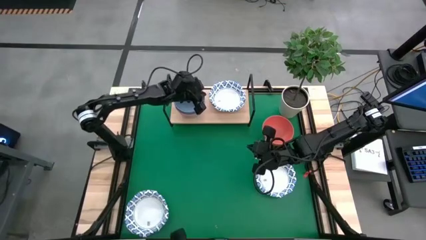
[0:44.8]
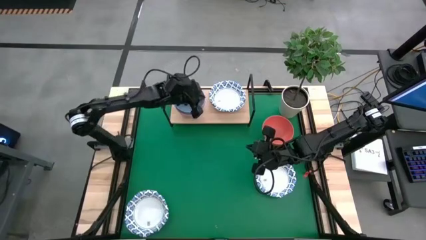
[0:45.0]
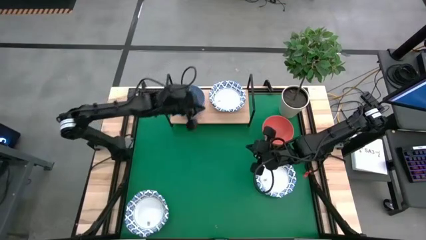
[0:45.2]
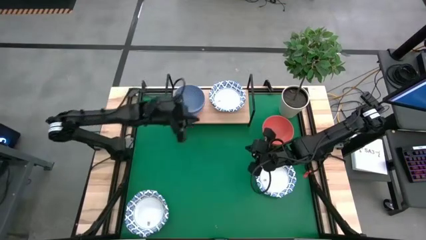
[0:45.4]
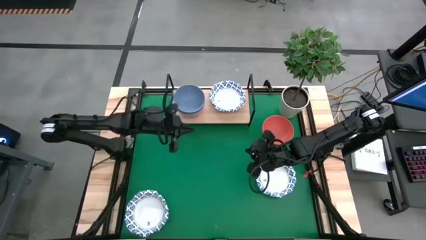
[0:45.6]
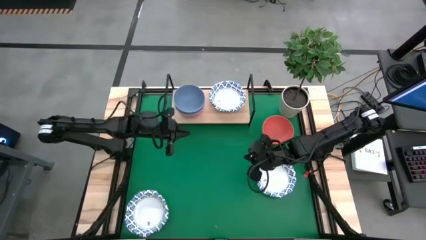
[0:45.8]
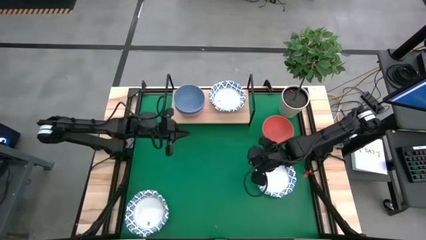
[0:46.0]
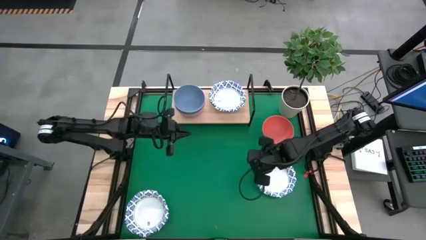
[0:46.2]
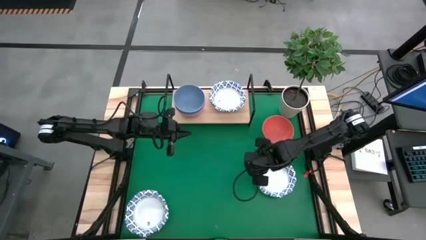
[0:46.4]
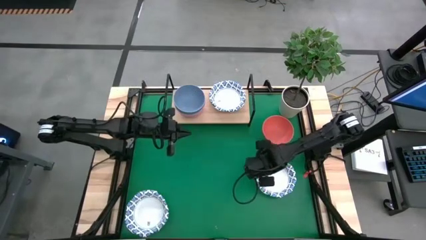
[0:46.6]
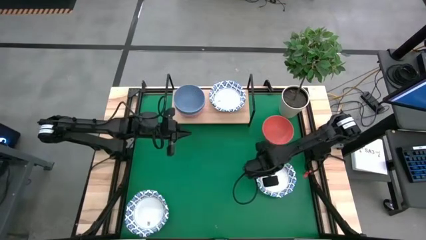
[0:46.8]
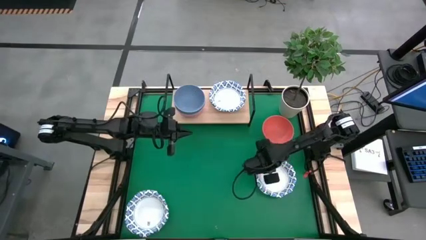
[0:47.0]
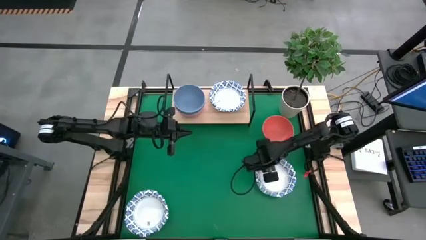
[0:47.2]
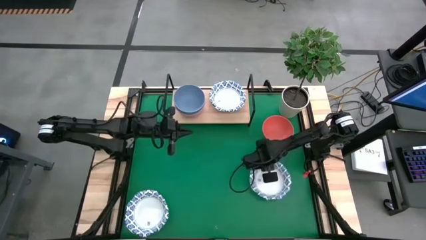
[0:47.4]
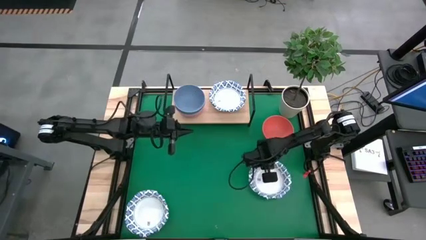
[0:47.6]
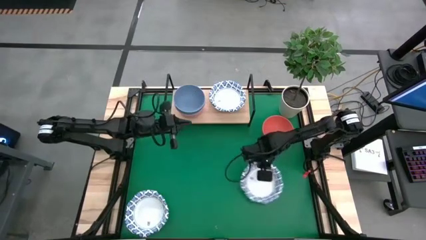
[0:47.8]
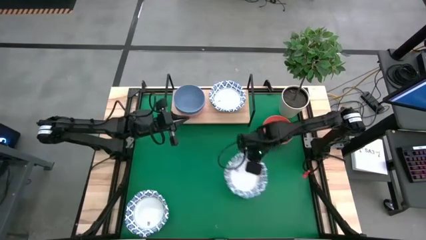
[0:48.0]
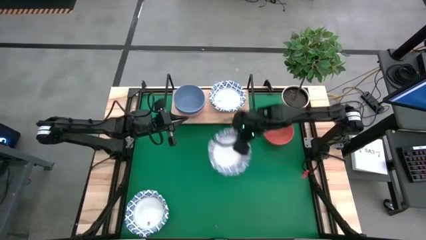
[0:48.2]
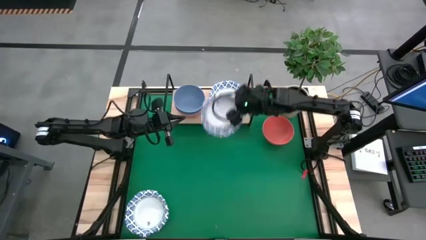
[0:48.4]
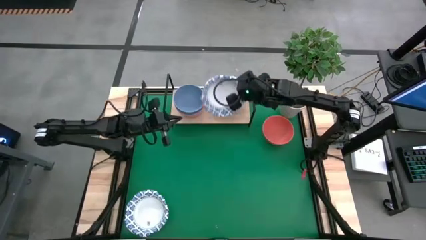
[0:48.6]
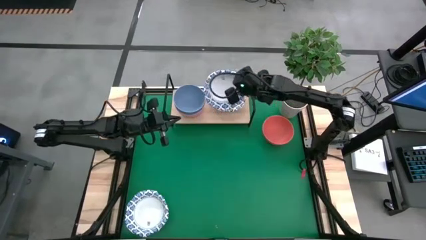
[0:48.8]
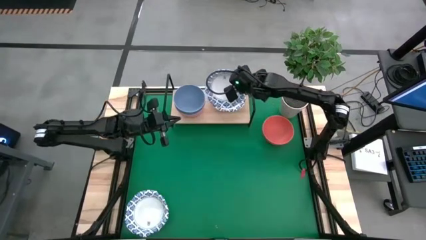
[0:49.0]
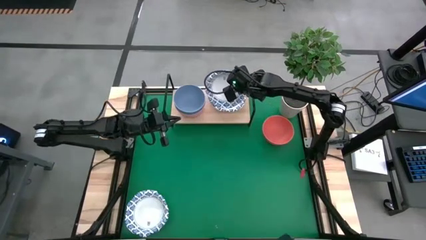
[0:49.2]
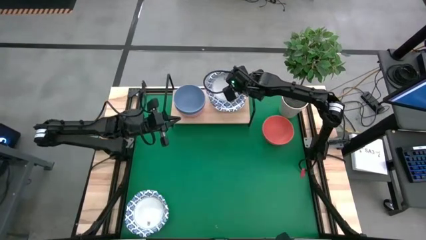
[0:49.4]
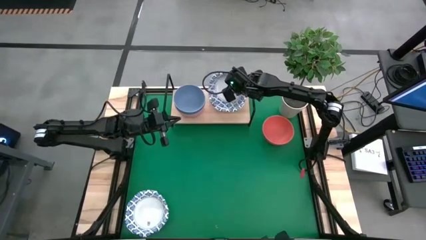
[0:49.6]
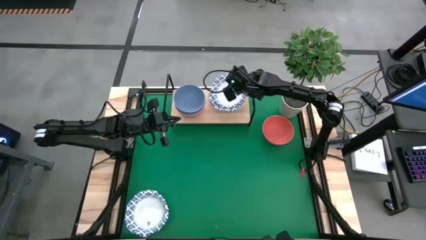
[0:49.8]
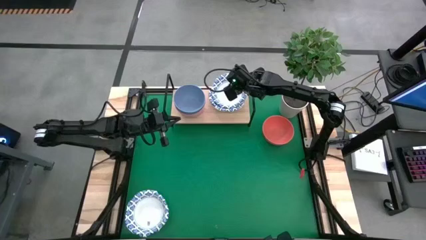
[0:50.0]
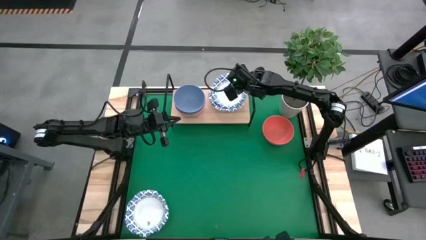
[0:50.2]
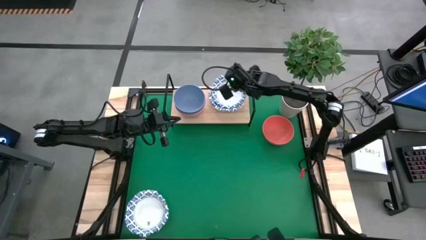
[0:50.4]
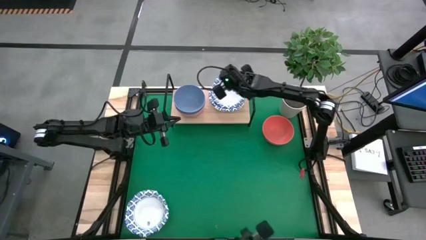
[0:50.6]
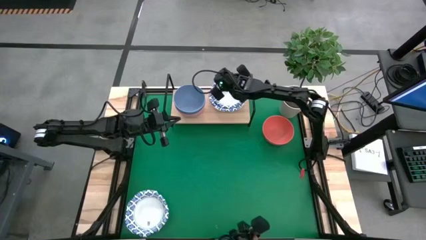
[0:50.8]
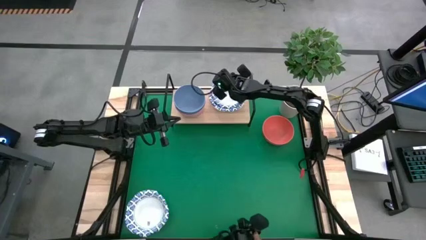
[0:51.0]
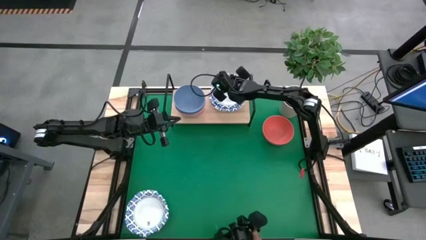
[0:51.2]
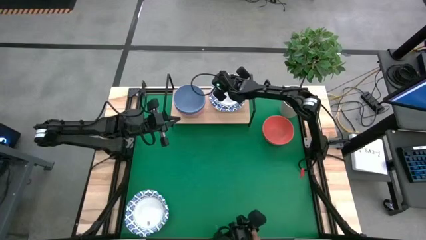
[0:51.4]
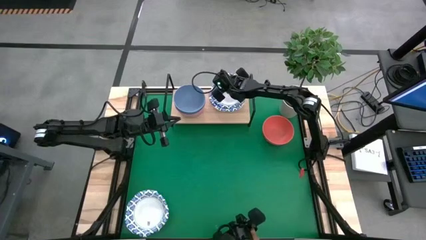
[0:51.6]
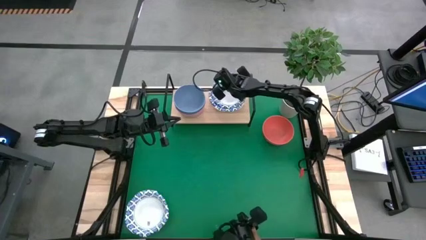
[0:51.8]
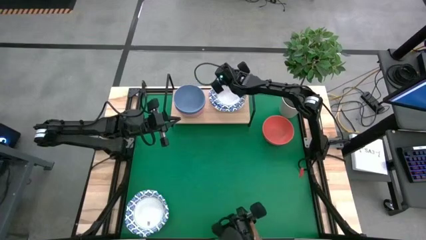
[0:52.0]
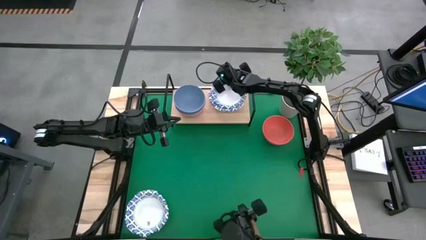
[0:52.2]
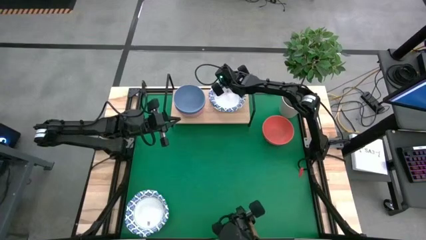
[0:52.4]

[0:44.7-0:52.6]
Task: Place and stack bowls onto a shelf
Stack the blue patterned bowl on top of the blue patterned bowls on the shelf

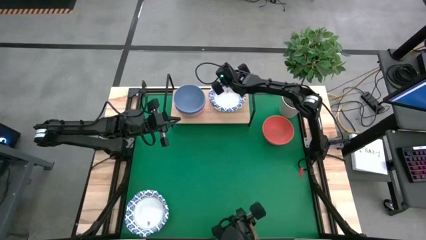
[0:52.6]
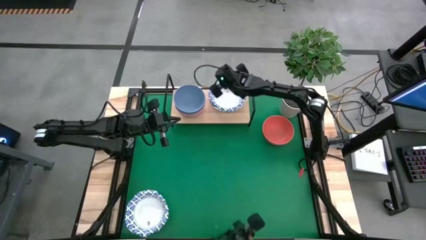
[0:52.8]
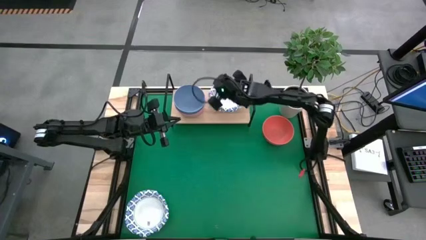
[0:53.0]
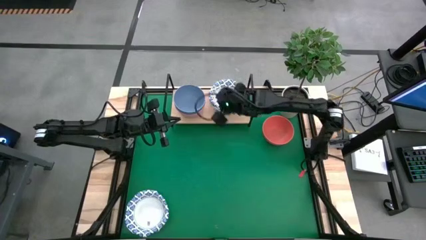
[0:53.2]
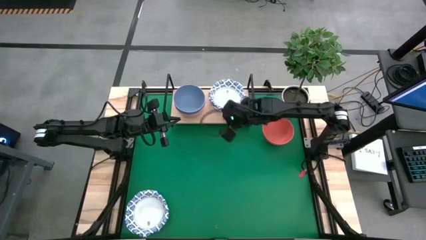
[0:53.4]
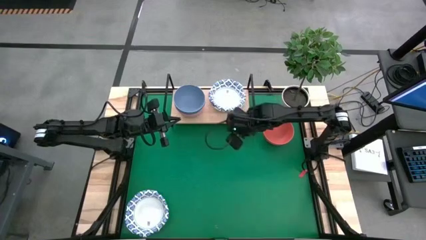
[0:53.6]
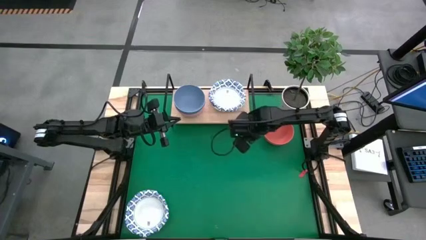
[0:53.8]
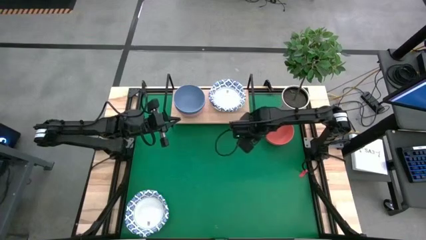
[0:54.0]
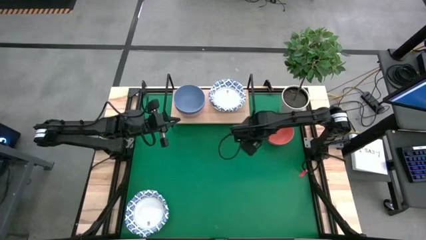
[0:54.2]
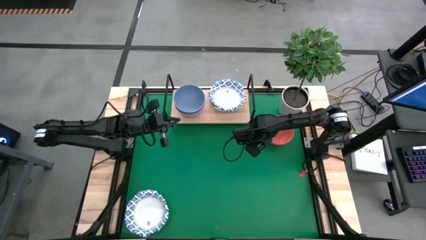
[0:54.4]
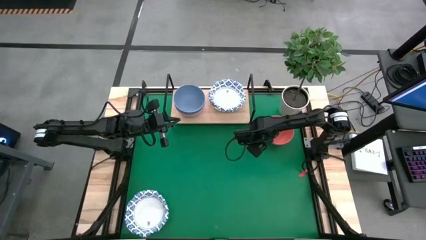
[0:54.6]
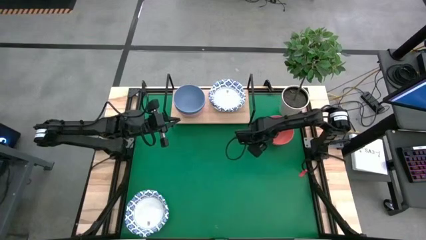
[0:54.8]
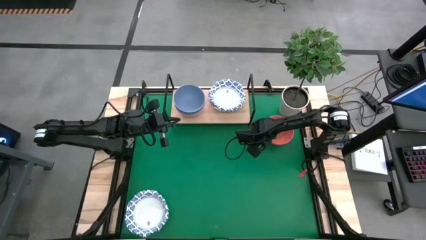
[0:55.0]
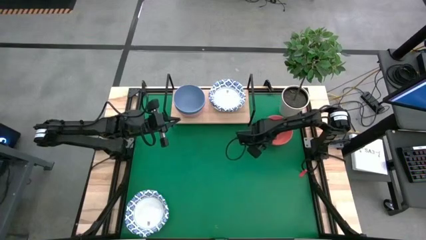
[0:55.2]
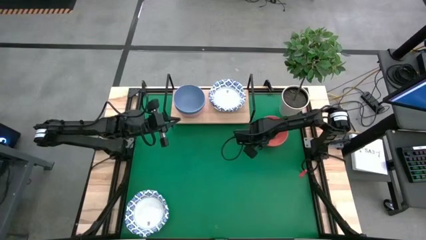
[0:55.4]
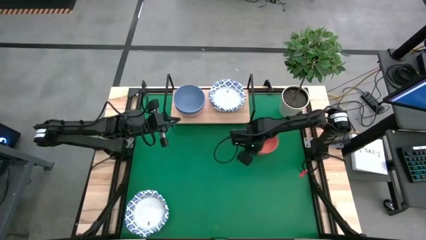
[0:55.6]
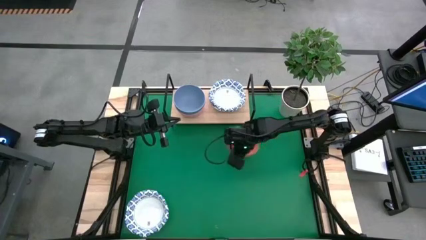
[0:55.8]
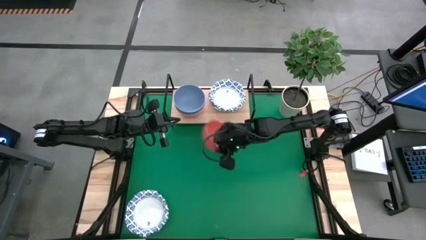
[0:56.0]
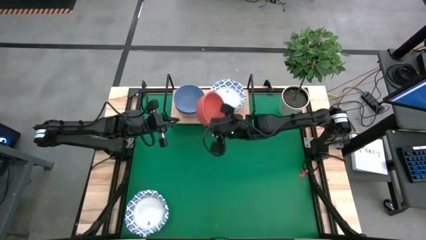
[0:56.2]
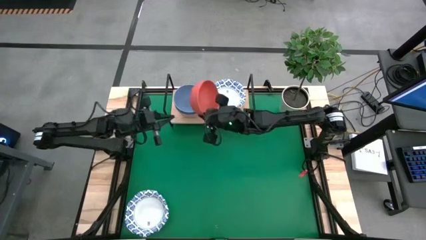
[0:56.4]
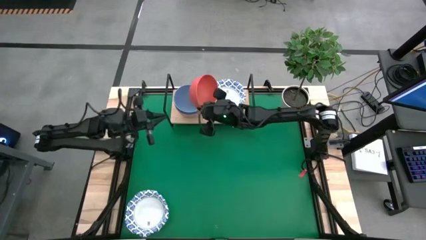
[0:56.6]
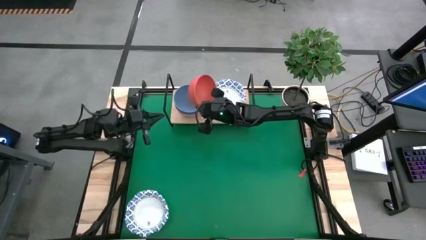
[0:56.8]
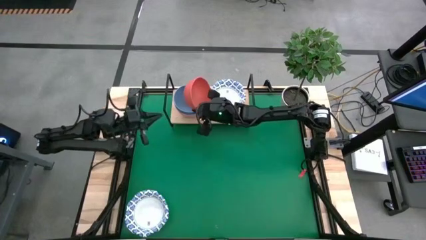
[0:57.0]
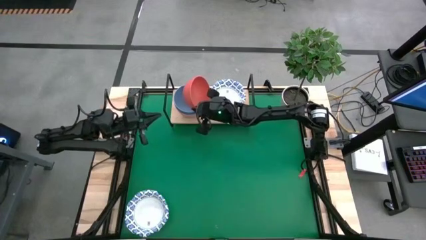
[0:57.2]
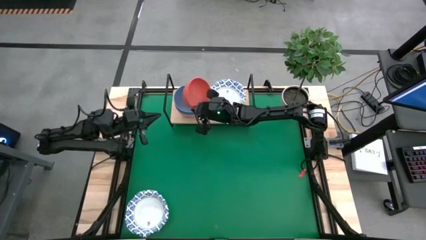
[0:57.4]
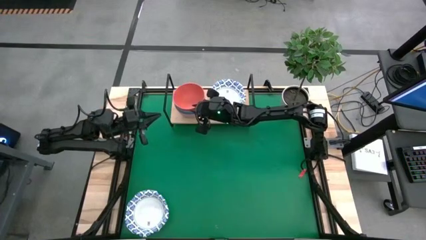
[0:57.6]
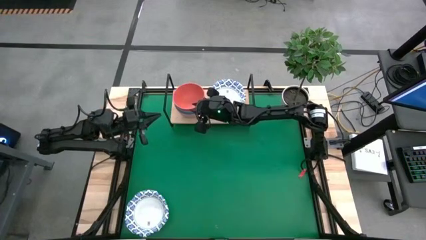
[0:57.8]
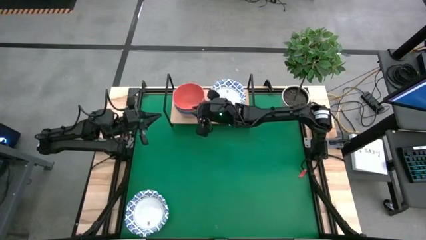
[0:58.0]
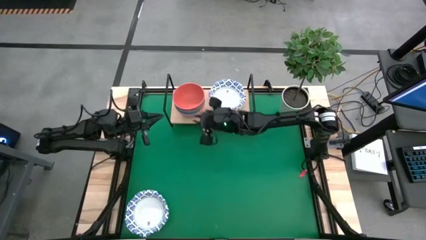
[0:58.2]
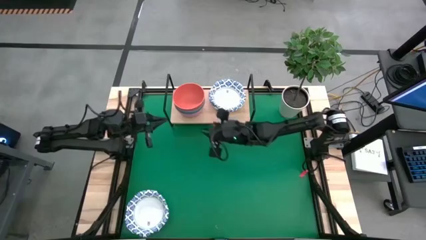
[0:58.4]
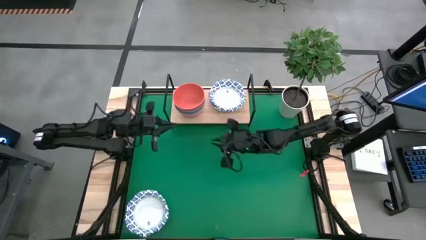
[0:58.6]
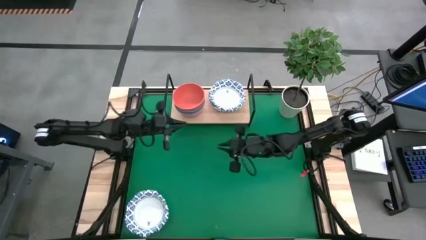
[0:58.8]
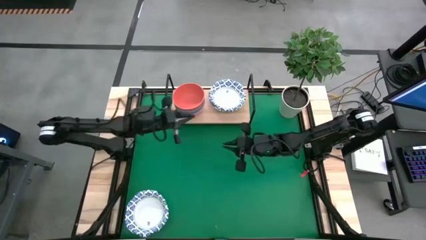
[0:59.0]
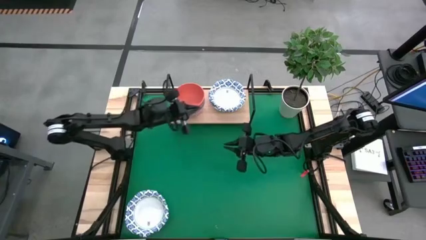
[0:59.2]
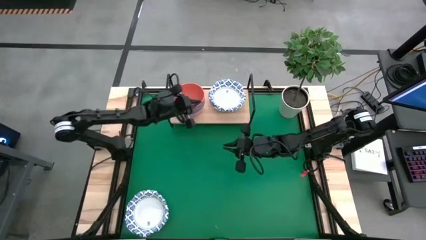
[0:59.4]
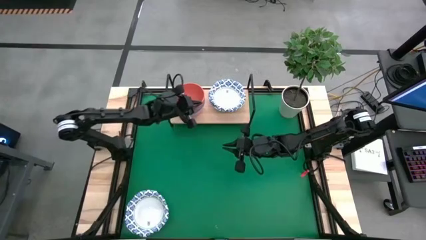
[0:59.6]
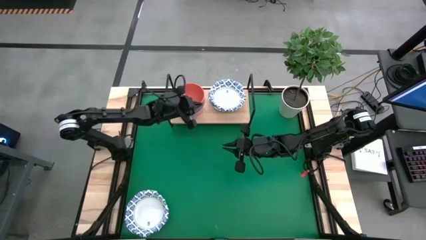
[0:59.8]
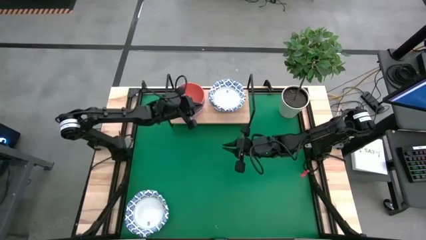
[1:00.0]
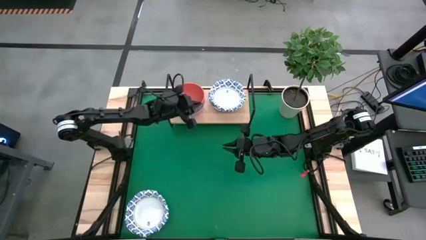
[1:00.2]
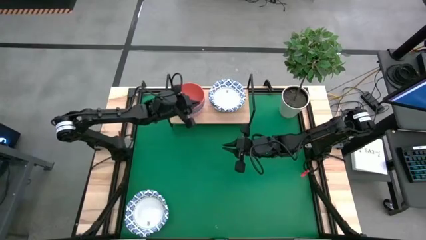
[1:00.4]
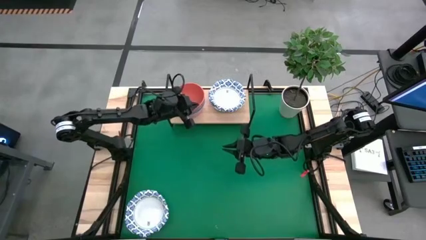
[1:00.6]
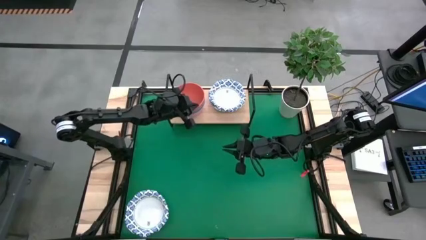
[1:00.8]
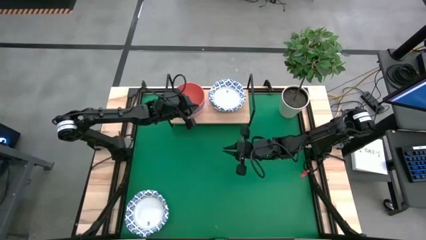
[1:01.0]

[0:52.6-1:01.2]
Stack orange bowl on top of the blue bowl on the shelf

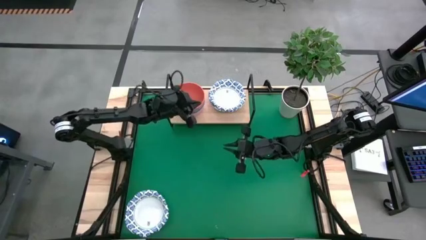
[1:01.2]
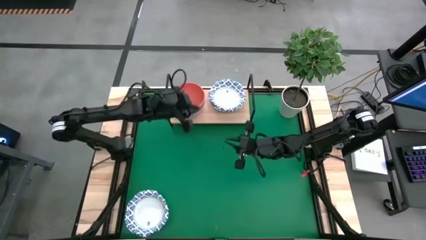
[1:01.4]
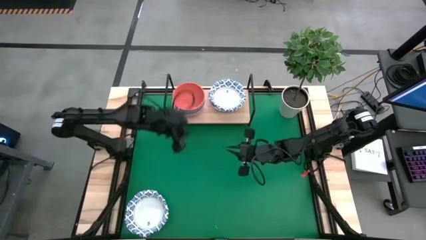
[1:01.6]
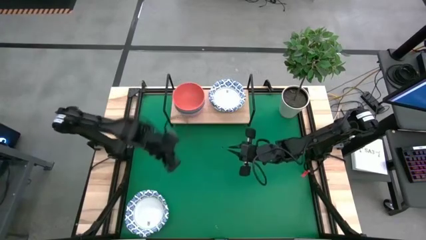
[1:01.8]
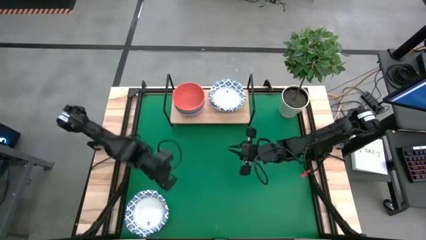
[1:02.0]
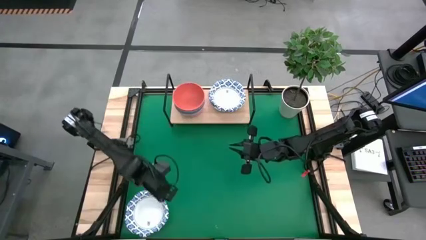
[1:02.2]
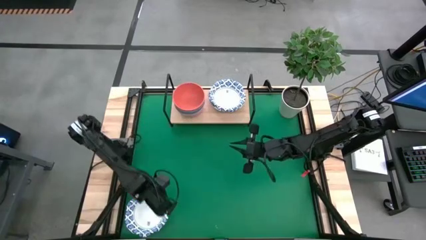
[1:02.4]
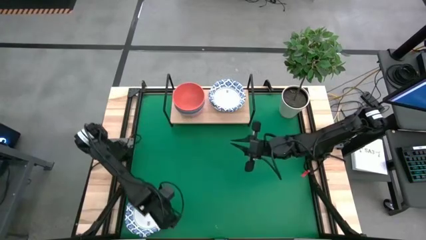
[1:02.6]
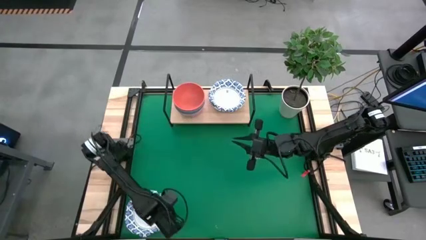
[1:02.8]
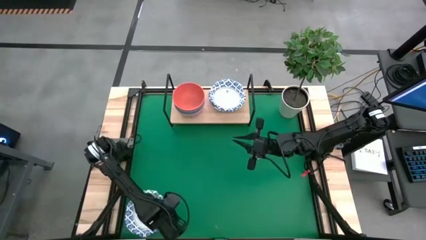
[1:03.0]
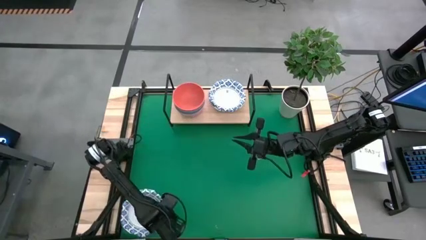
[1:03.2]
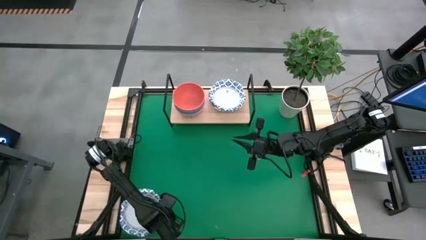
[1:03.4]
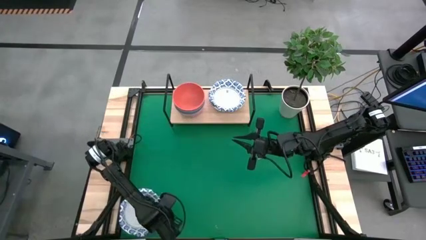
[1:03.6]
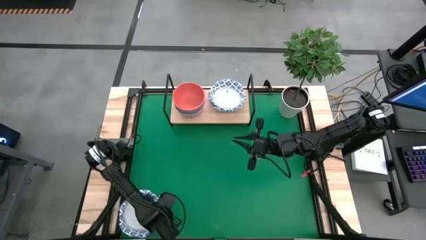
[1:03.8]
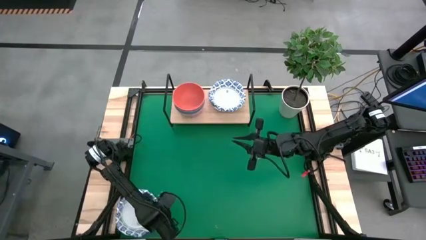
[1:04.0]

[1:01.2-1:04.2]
Stack blue patterned bowl on top of the blue patterned bowls on the shelf
